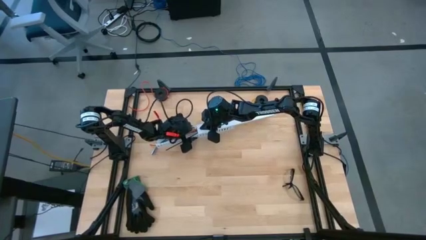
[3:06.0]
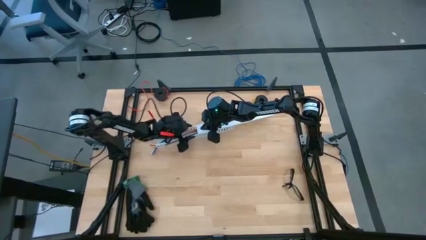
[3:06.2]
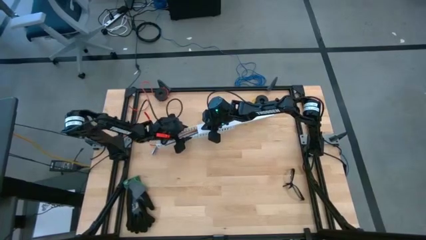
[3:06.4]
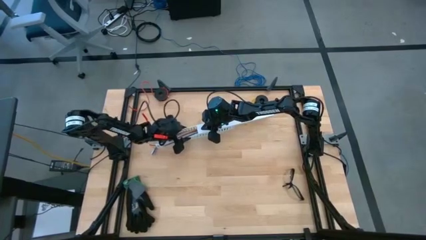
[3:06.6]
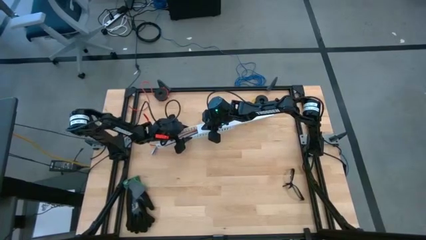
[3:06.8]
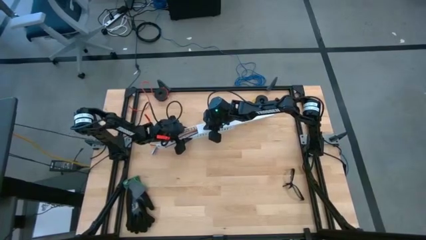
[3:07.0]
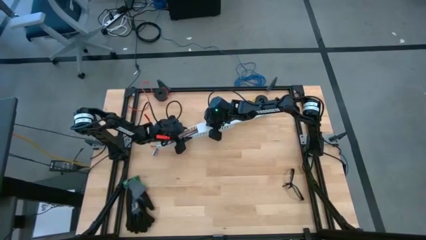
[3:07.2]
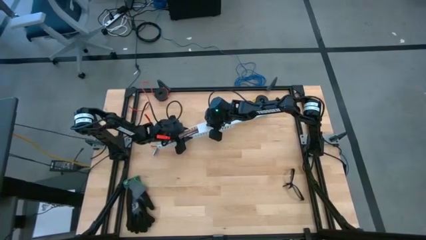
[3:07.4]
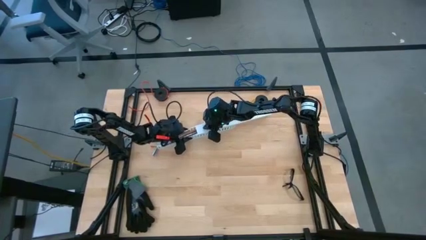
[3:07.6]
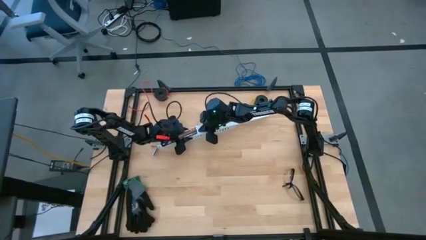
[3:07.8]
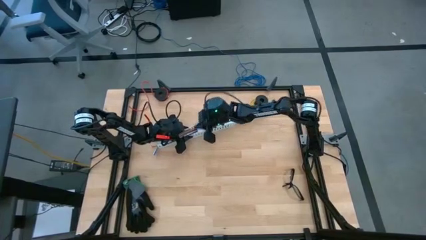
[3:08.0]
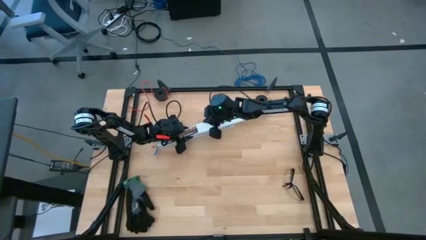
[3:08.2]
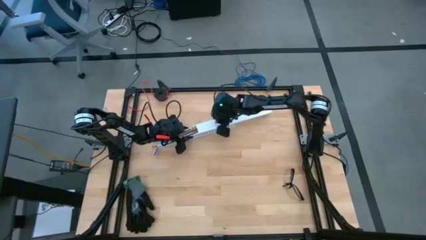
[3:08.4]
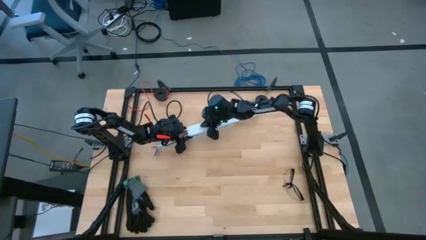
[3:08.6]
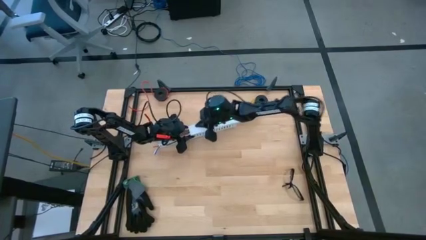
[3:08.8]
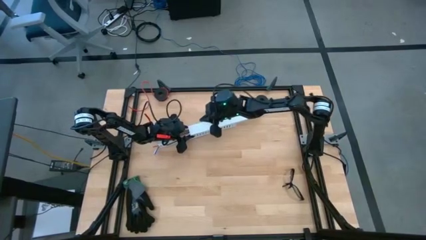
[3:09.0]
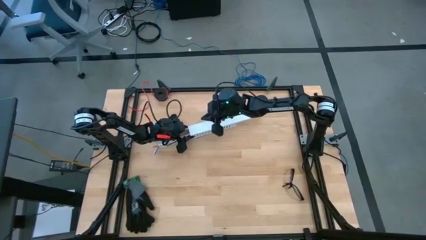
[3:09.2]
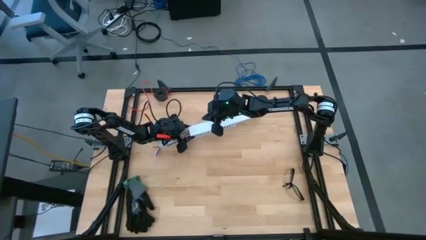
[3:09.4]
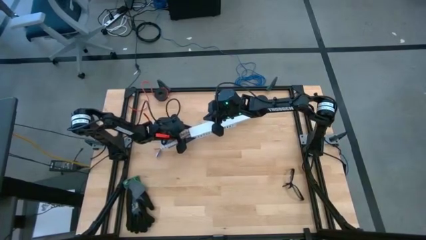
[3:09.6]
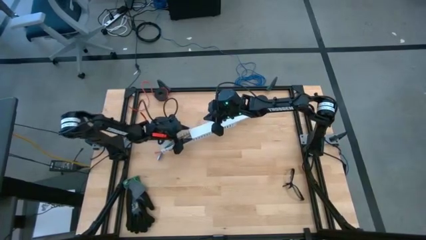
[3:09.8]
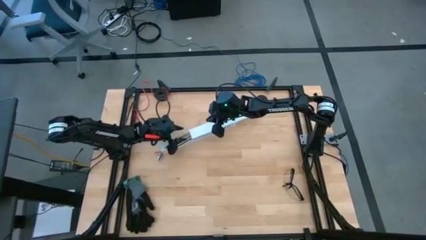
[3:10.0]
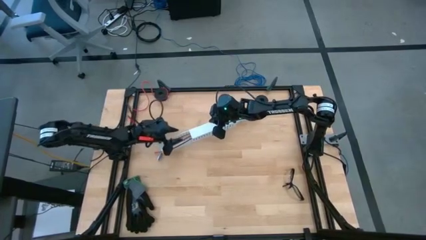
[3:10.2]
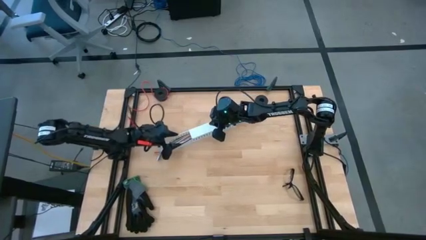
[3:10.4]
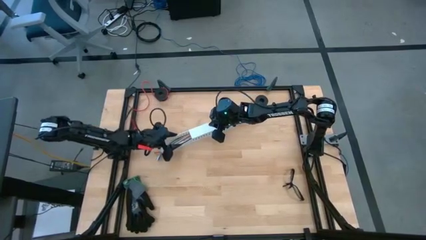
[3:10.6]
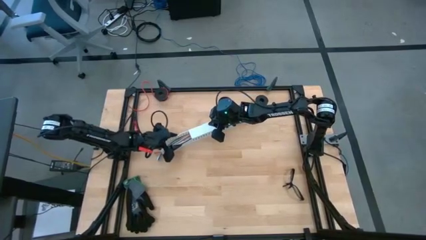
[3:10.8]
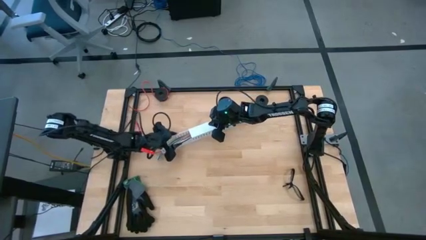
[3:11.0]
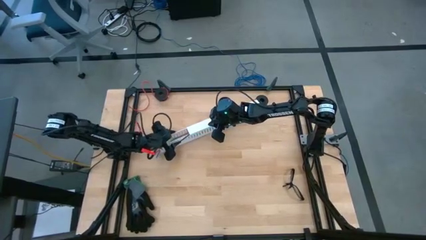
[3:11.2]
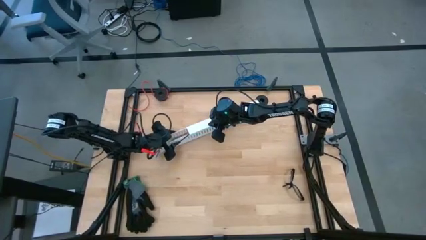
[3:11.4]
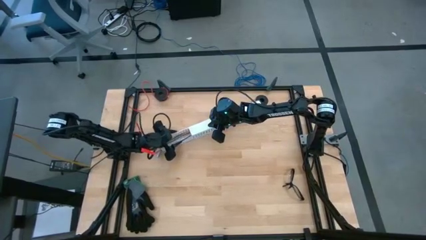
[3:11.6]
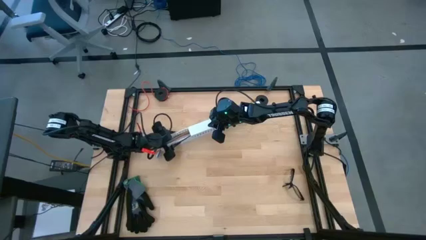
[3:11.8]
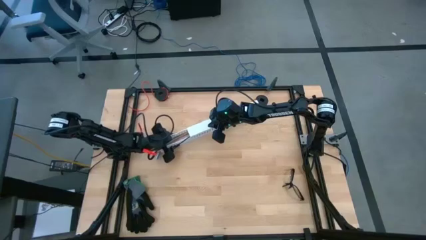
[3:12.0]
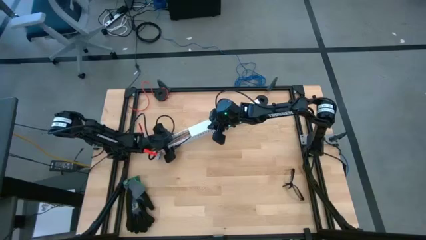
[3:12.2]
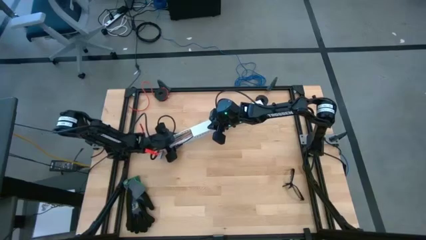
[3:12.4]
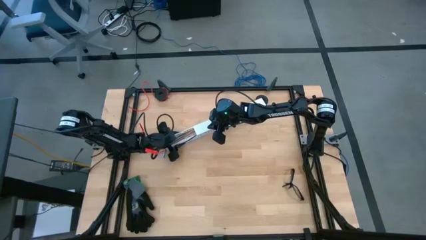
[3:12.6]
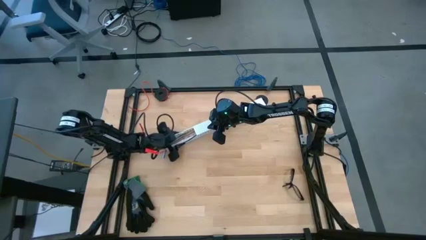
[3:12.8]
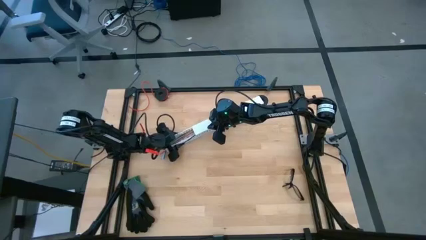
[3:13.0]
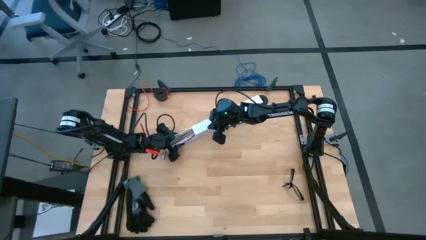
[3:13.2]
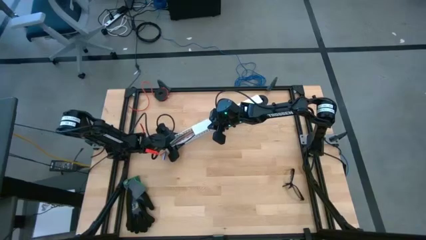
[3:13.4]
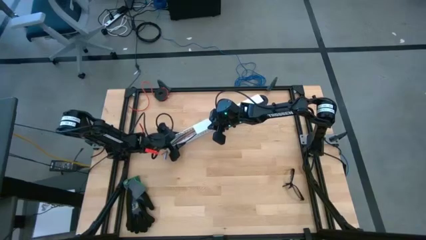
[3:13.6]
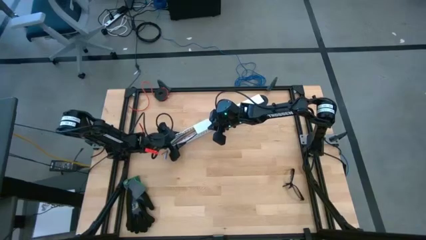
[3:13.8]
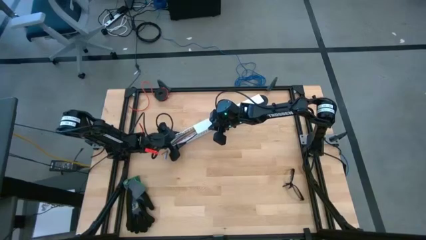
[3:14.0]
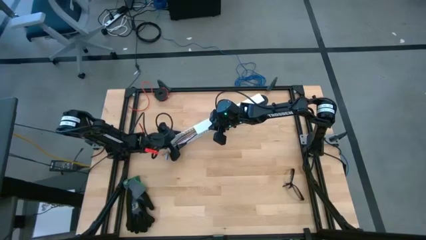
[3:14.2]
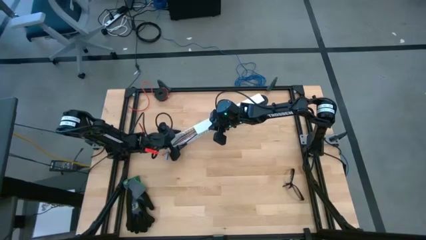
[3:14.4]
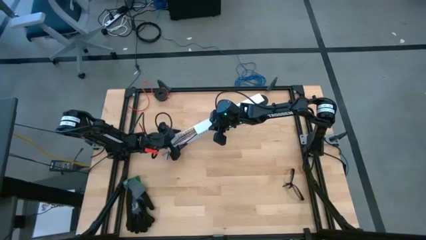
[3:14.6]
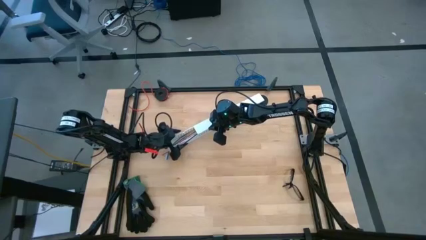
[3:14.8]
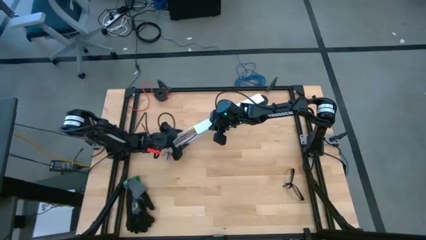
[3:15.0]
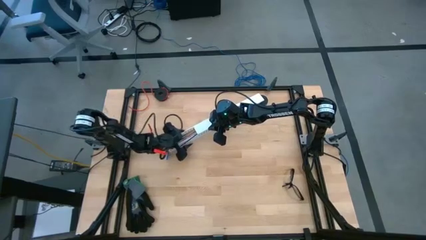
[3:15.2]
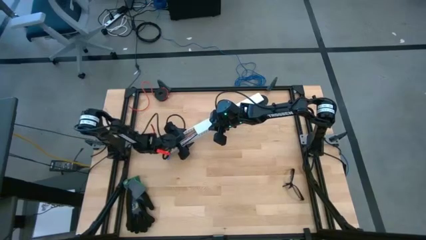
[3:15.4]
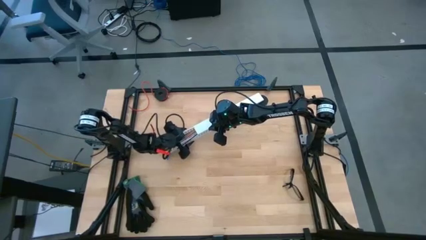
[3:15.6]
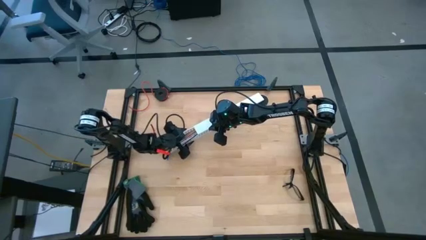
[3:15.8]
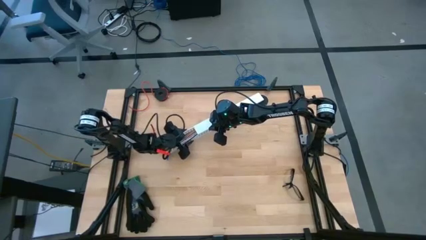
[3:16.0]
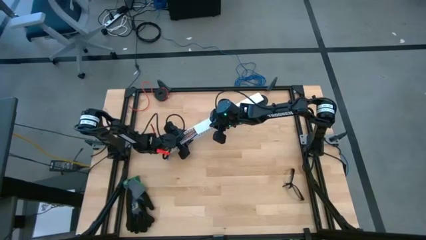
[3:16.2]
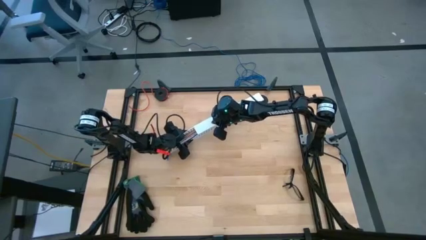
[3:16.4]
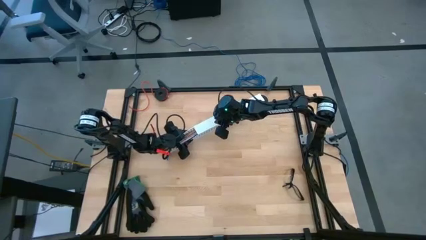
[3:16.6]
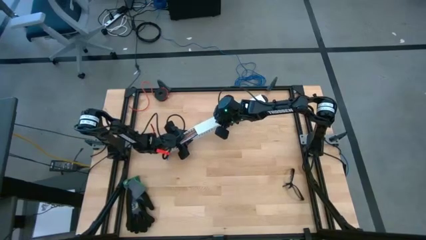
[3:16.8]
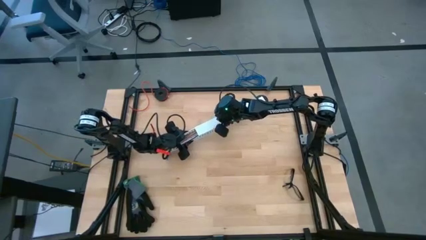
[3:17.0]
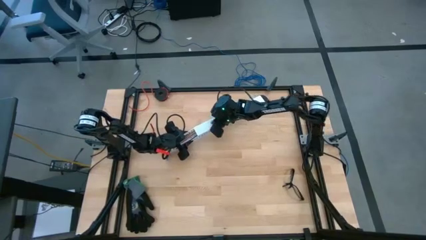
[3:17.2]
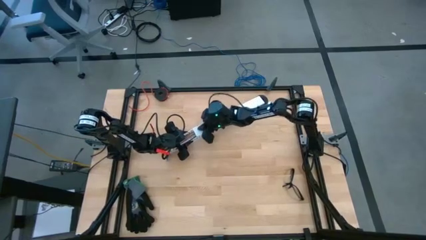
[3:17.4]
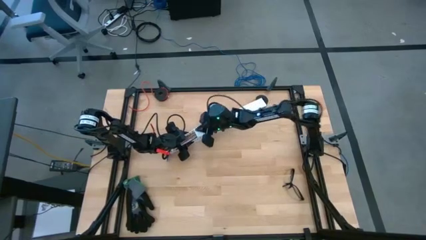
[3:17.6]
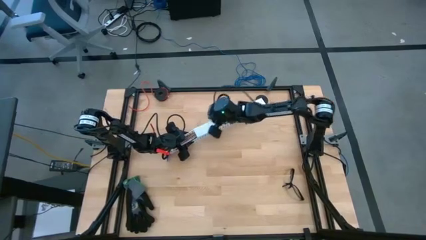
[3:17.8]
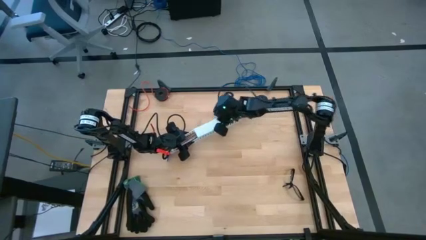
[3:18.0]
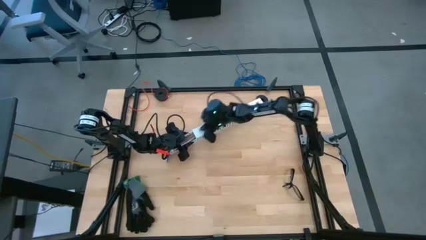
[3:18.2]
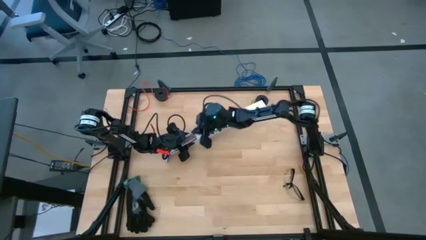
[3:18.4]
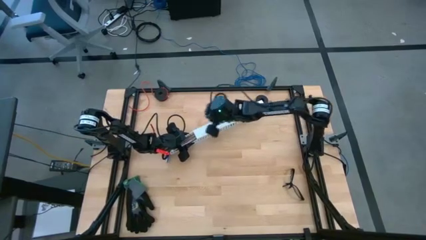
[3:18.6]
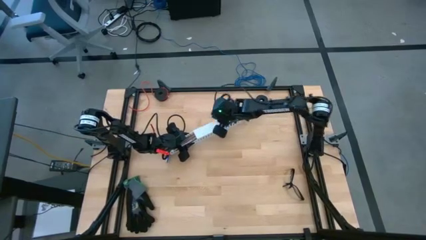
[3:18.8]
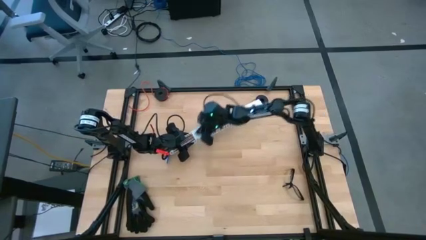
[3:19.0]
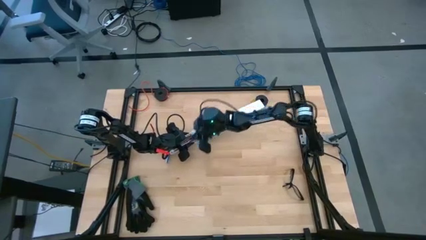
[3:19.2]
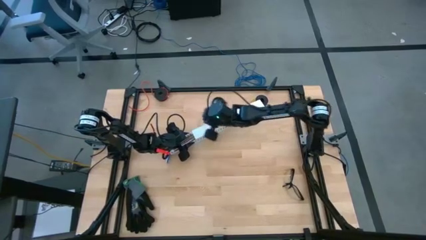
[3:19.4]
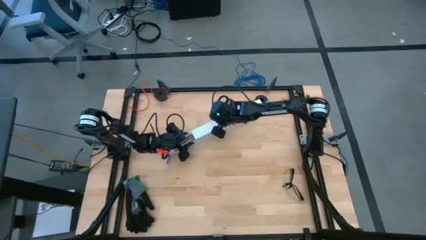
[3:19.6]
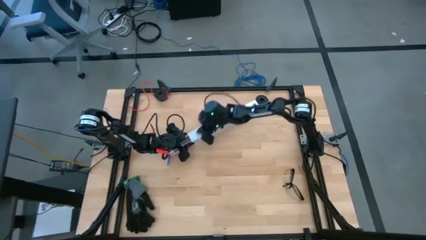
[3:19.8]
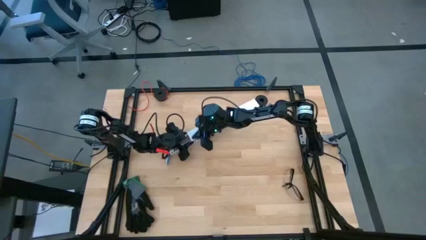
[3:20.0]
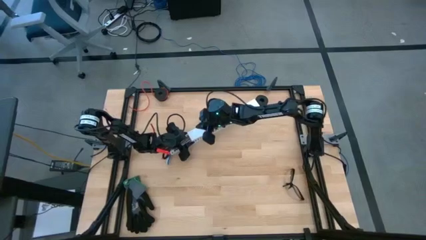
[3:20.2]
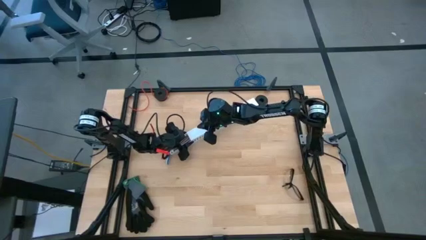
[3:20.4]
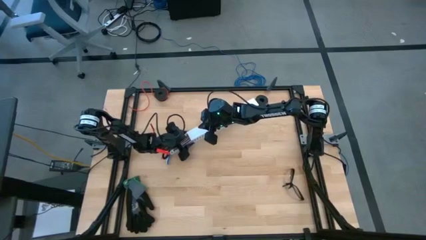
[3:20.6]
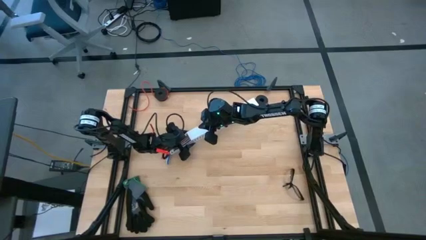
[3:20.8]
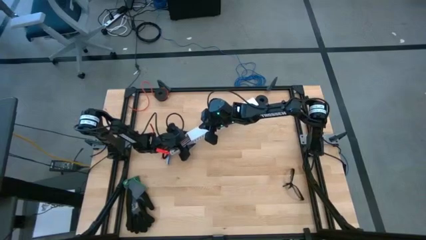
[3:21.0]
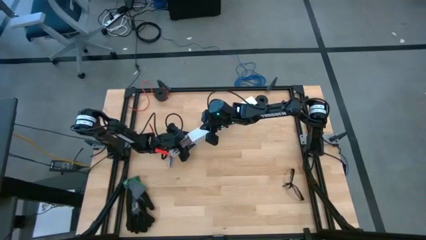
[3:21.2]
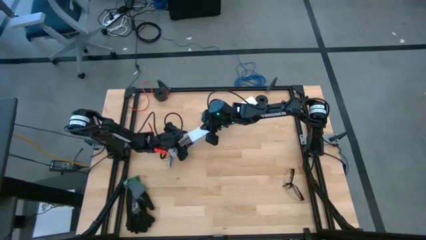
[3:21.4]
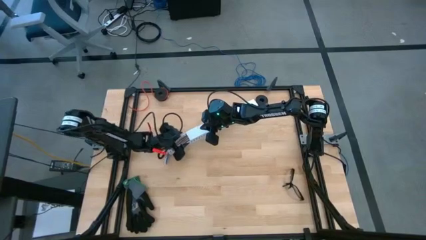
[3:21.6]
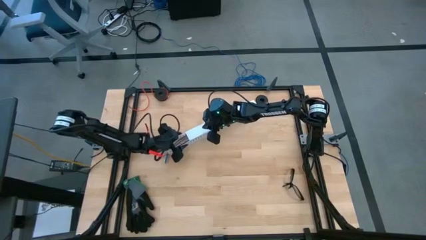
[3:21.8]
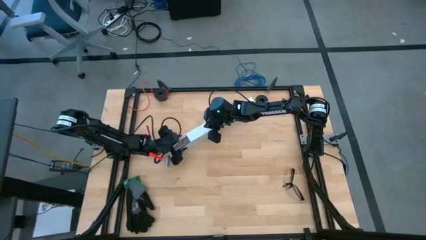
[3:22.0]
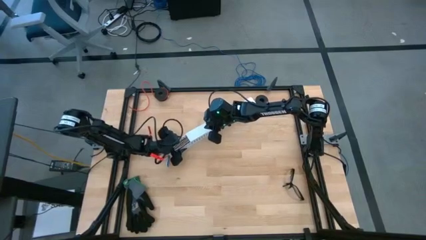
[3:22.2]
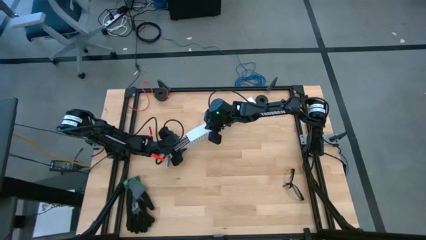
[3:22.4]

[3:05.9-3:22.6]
Task: Ziptie cables
Close the white cable duct
